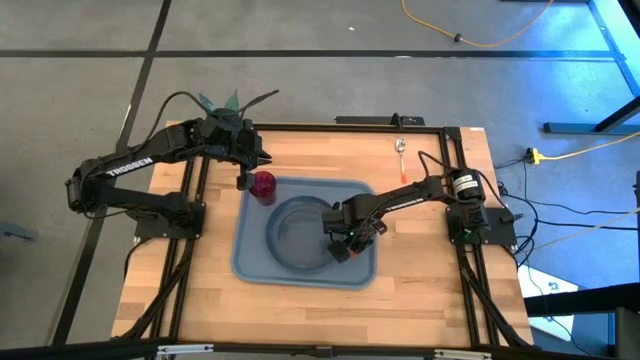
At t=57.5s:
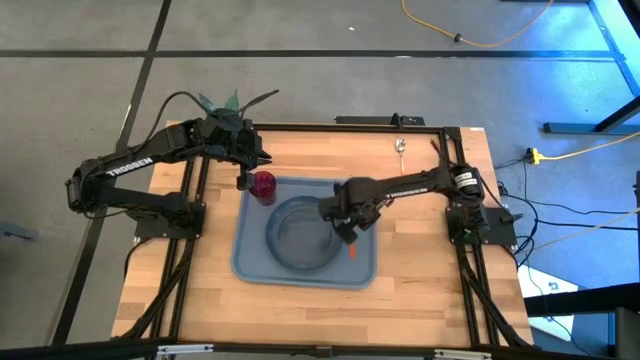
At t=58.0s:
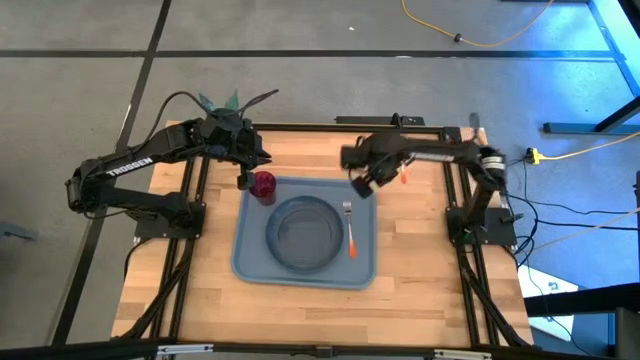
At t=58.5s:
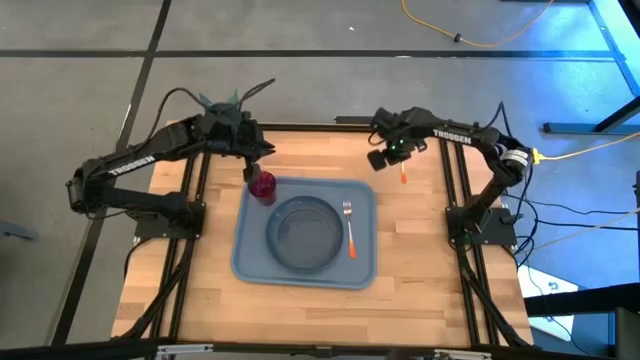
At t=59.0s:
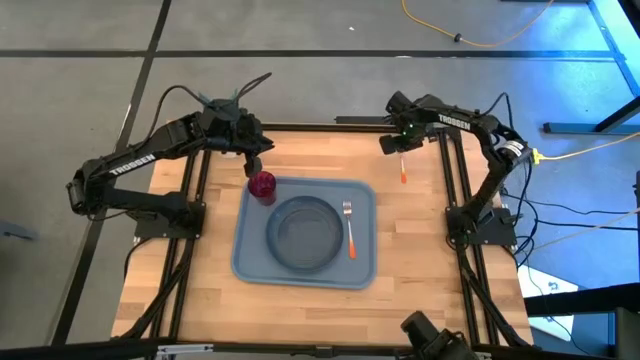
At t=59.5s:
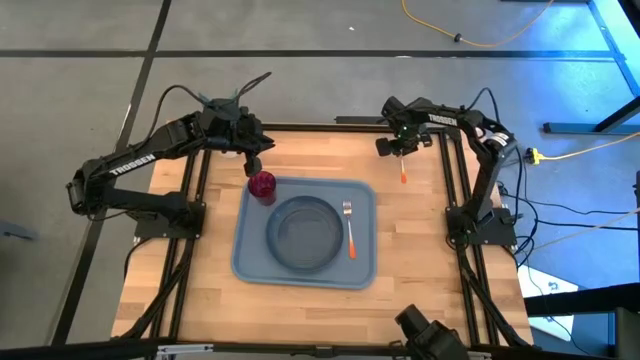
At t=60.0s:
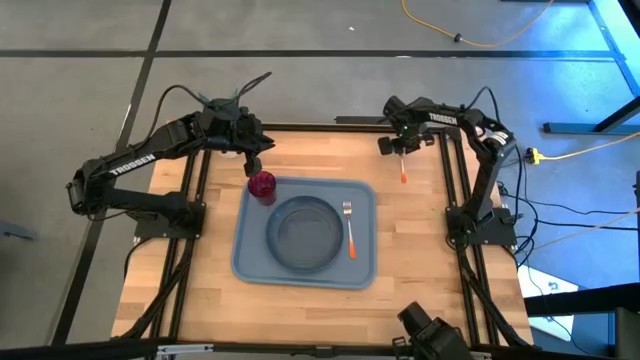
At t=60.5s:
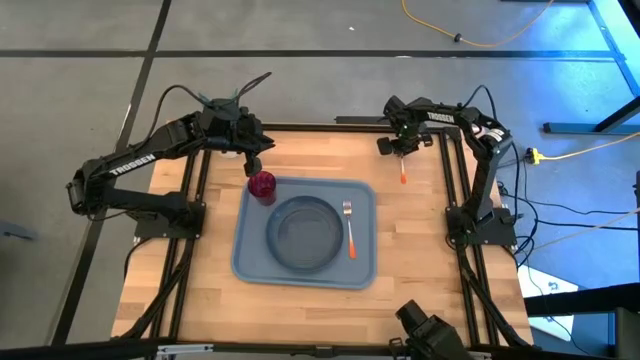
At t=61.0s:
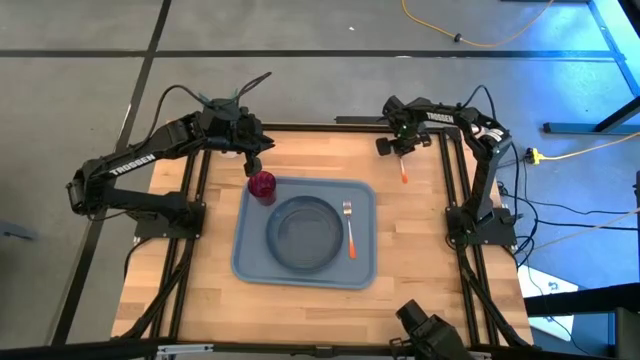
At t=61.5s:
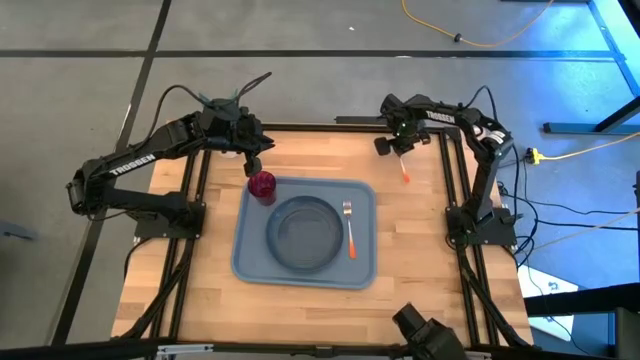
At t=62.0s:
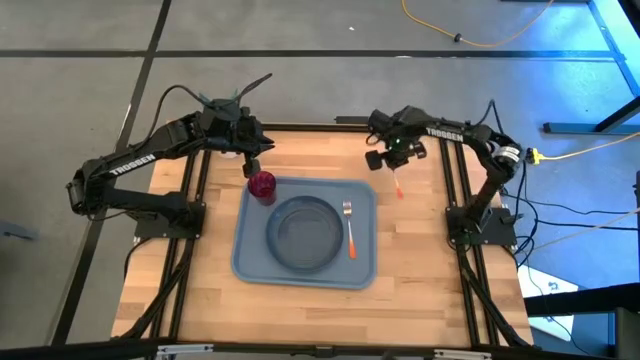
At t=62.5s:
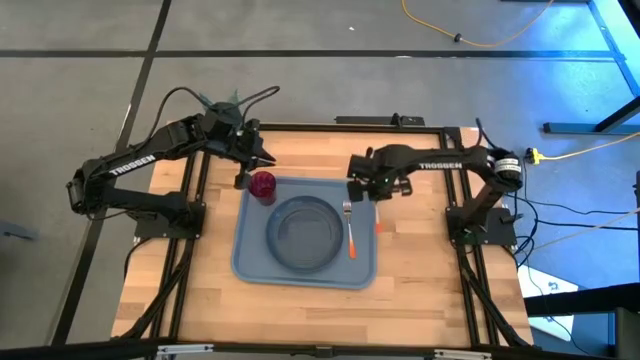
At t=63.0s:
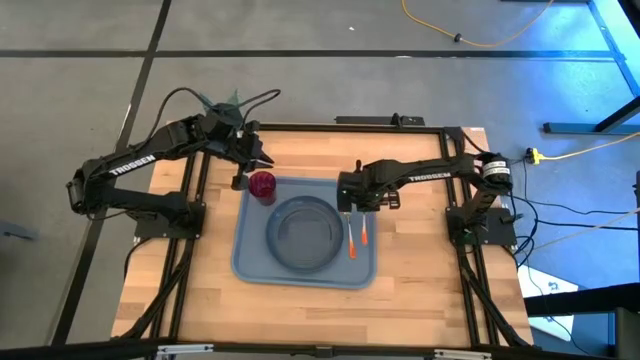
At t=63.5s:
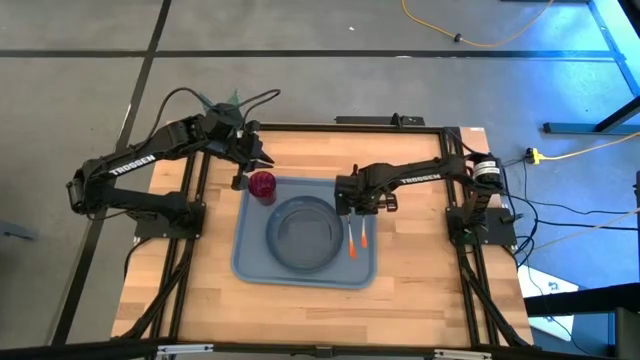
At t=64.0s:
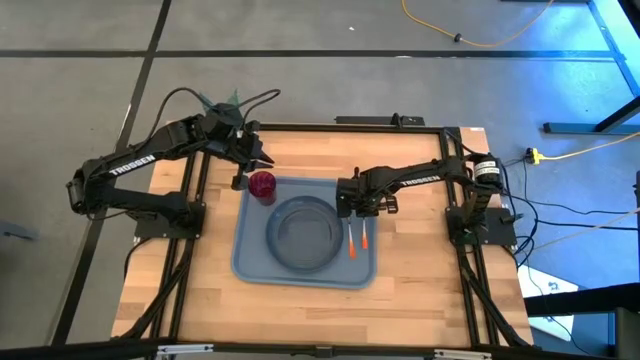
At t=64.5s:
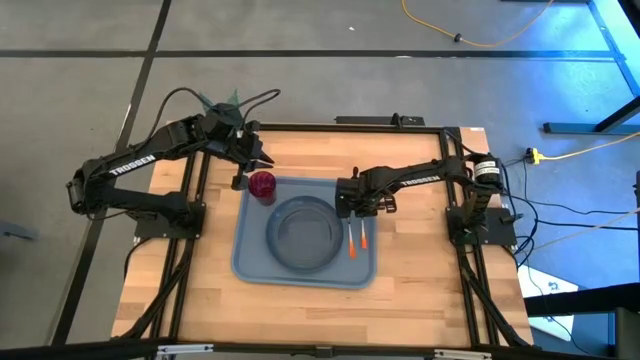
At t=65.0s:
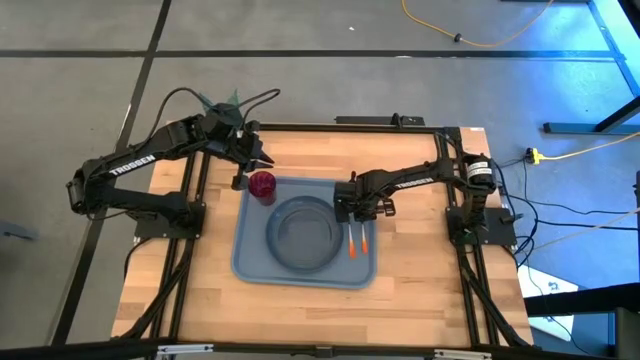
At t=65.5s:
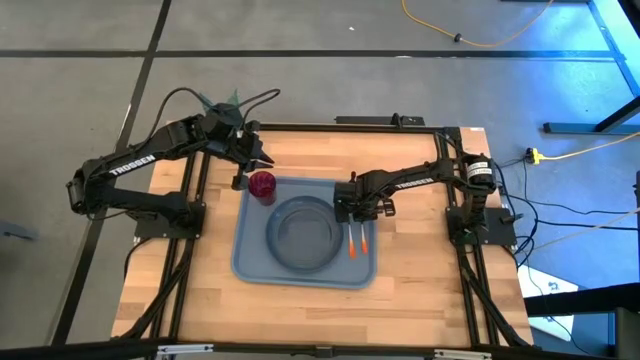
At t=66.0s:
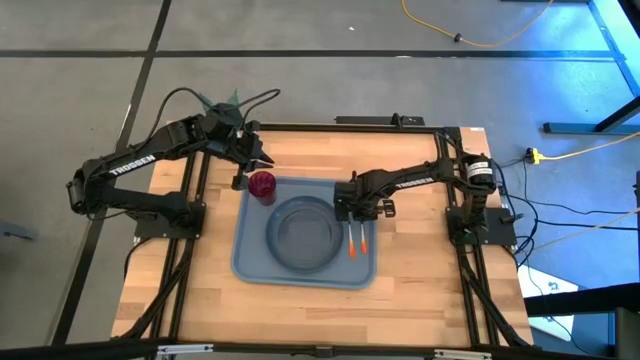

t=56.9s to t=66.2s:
Task: Pick and place plate/cup/fork/spoon on tray
Put the orange spoon on the blue tray, beside the orange fork

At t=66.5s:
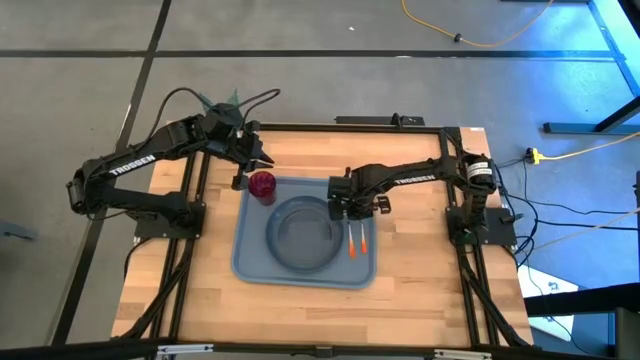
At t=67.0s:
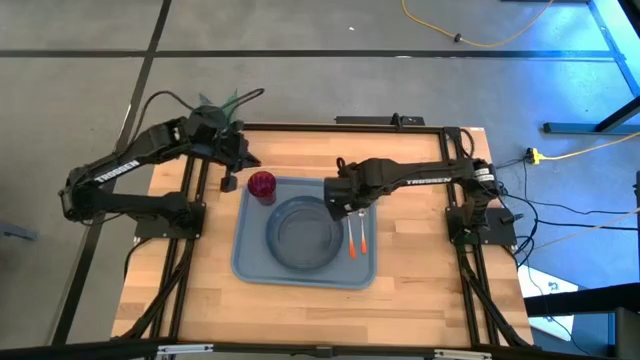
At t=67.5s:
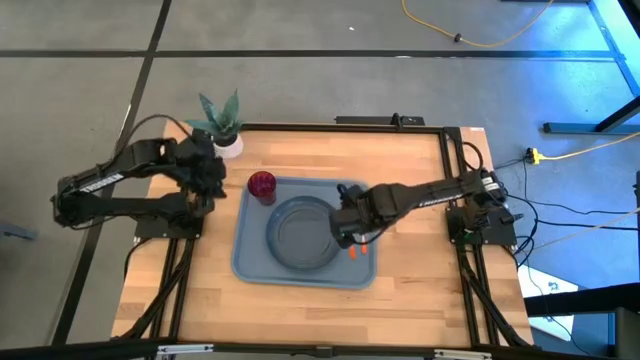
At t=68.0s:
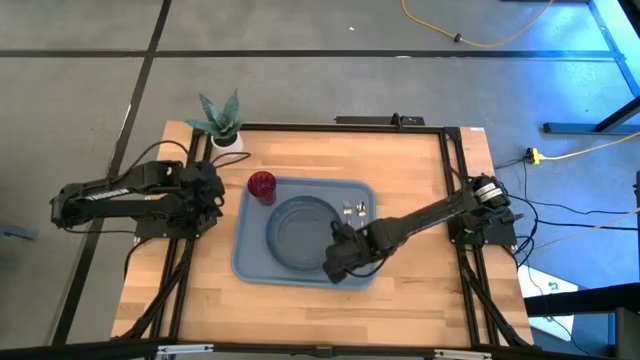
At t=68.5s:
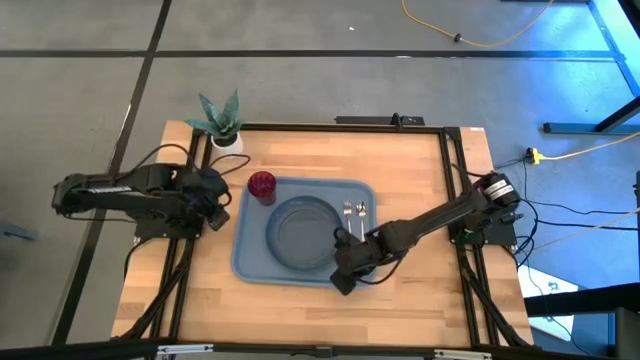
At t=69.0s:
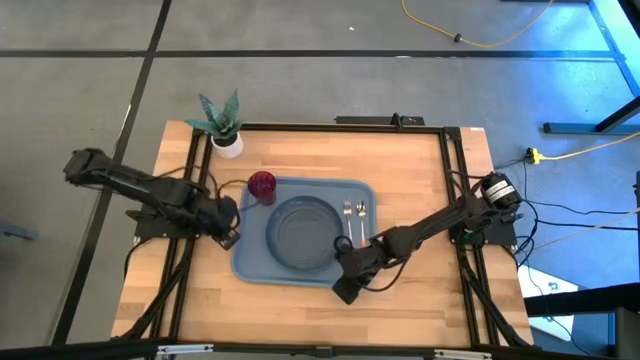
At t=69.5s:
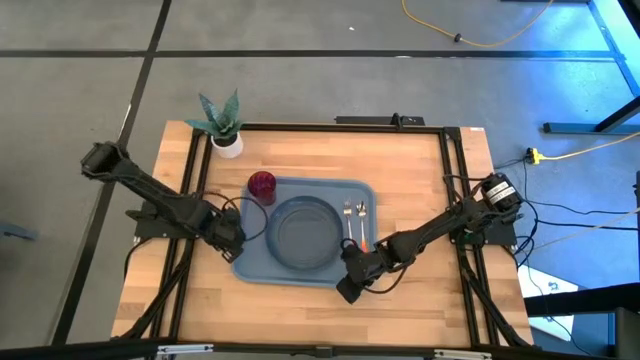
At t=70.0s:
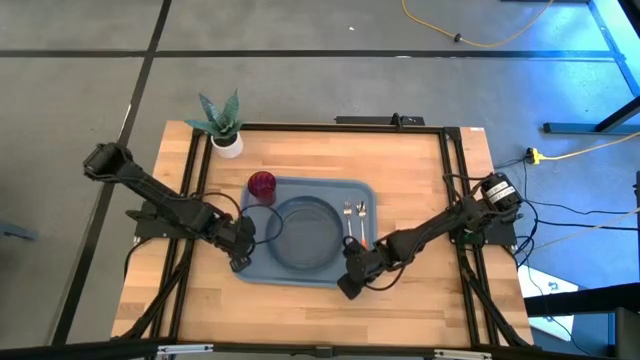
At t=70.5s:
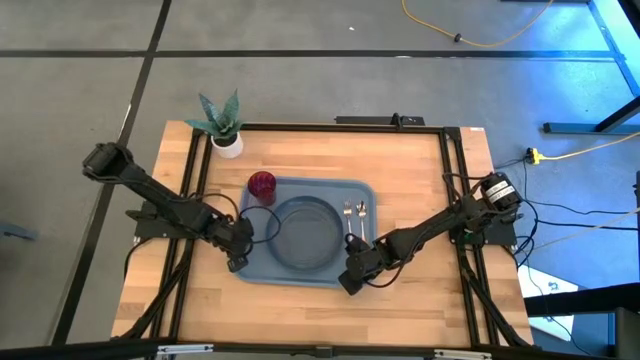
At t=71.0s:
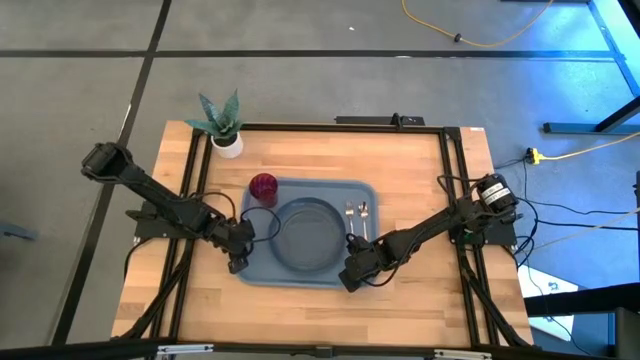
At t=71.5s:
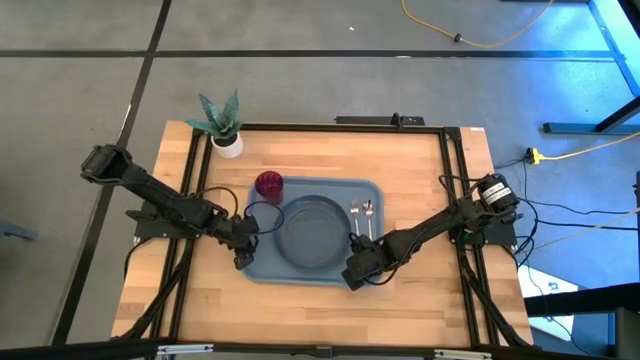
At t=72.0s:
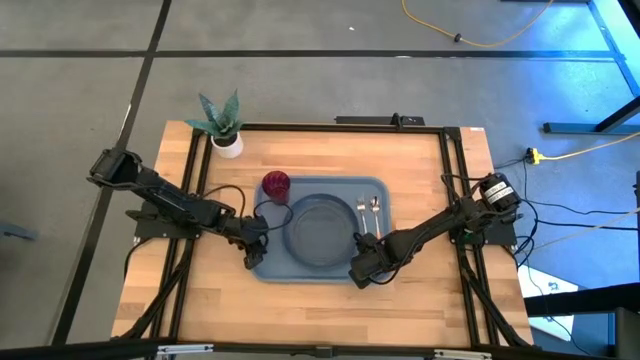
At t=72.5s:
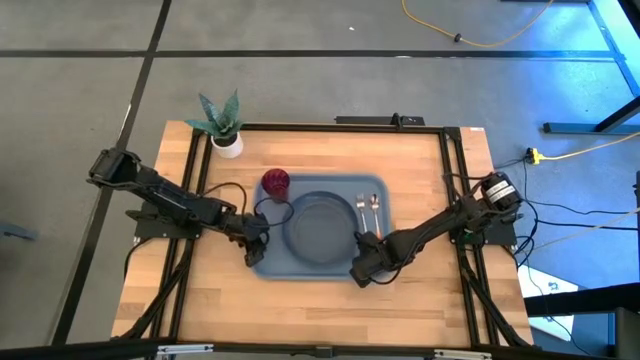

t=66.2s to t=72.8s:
Adjust the blue tray
